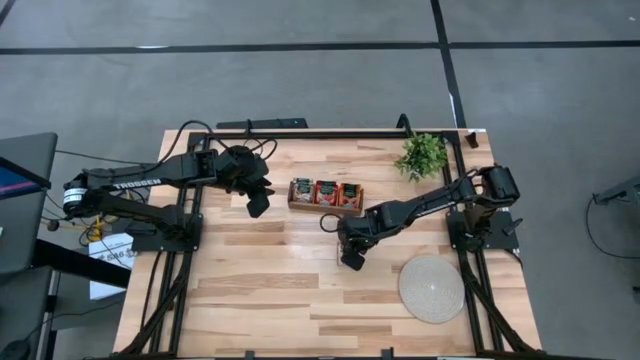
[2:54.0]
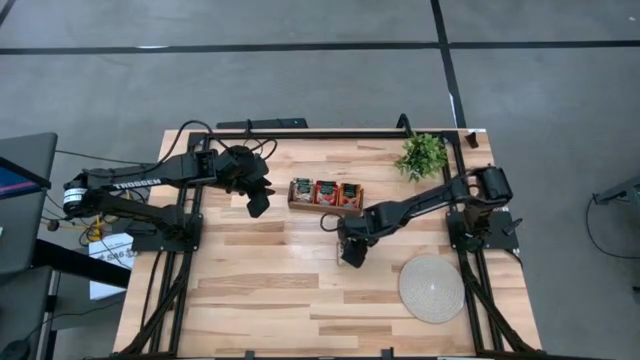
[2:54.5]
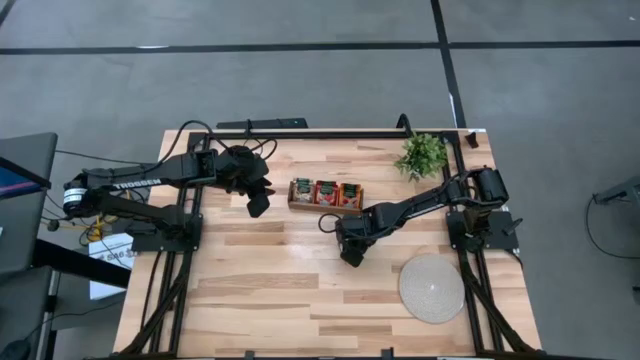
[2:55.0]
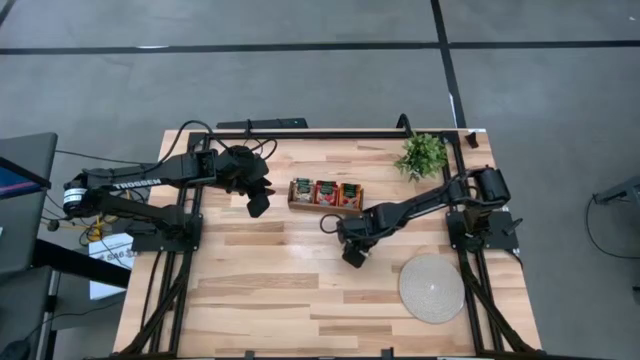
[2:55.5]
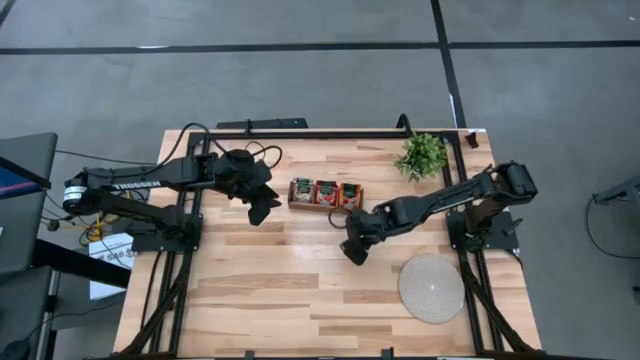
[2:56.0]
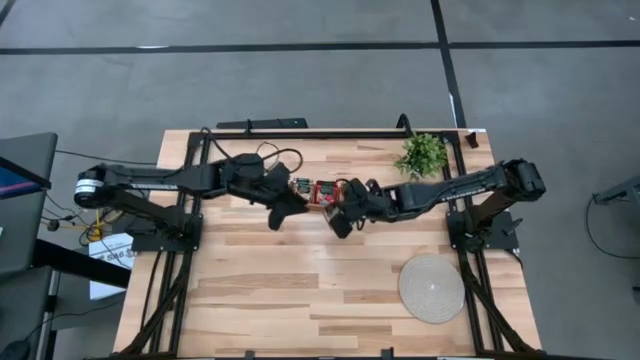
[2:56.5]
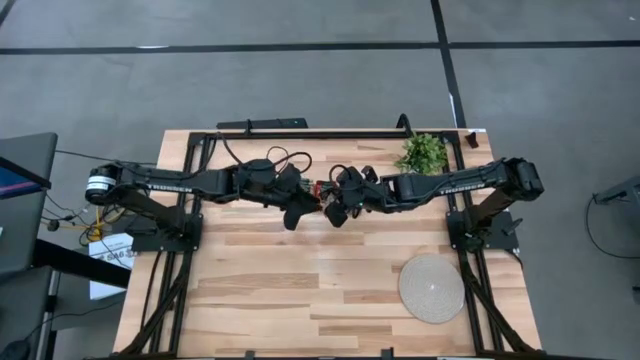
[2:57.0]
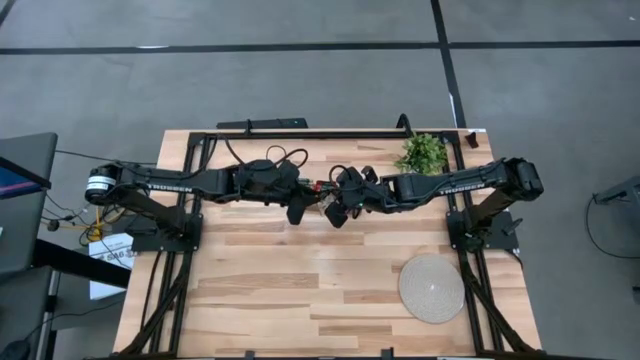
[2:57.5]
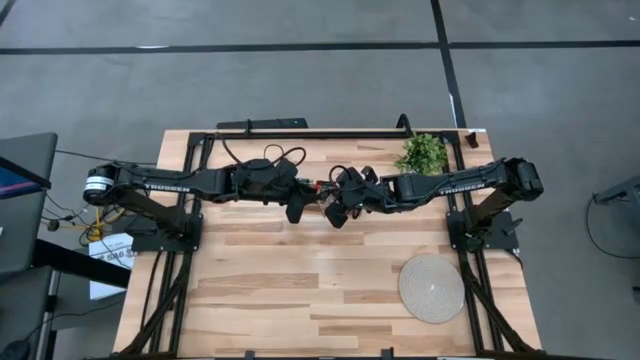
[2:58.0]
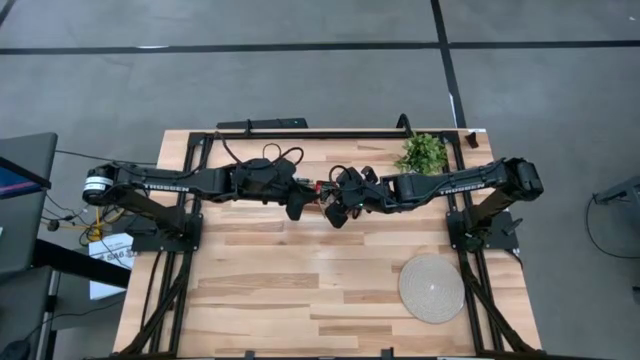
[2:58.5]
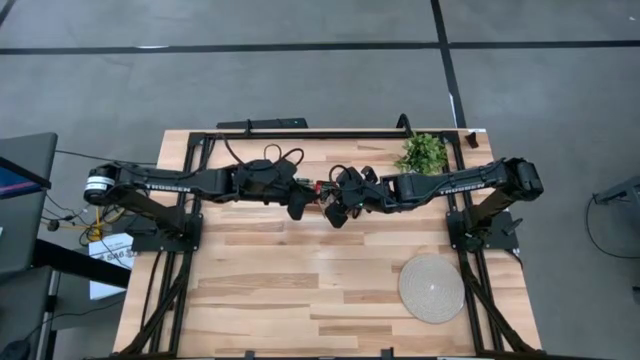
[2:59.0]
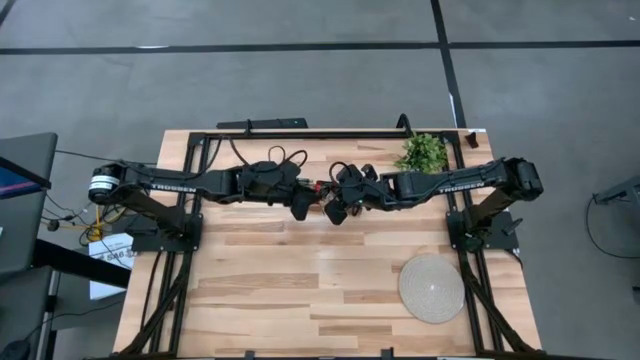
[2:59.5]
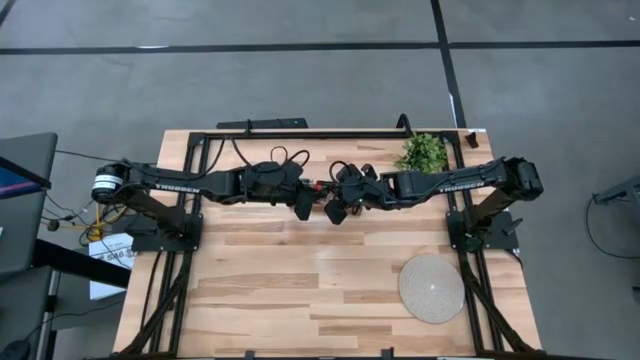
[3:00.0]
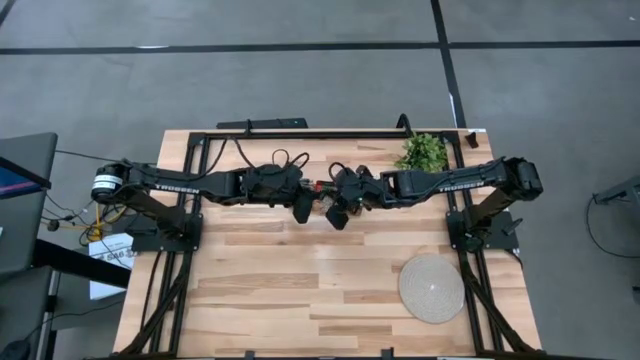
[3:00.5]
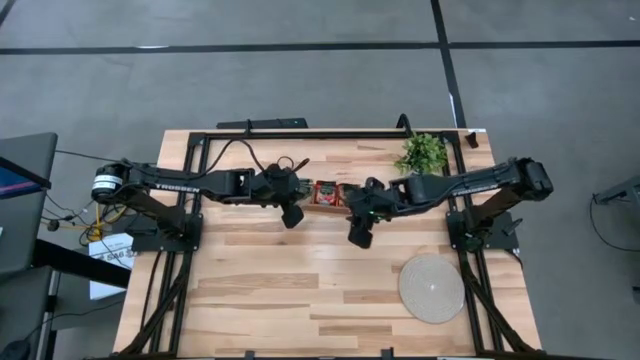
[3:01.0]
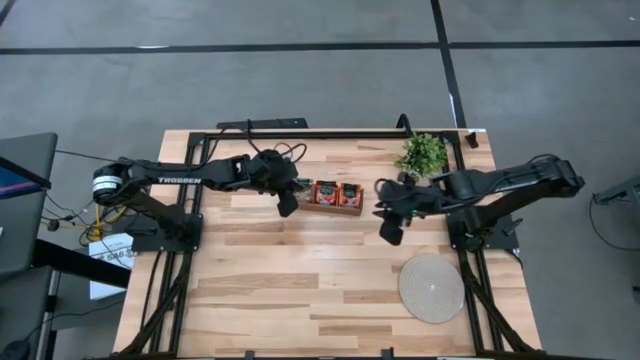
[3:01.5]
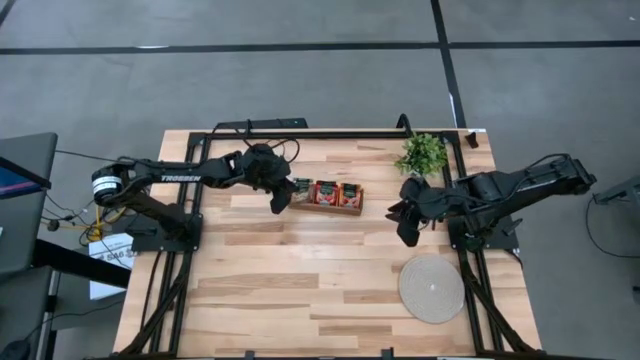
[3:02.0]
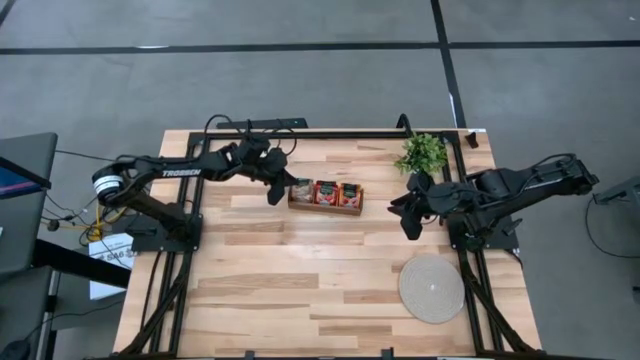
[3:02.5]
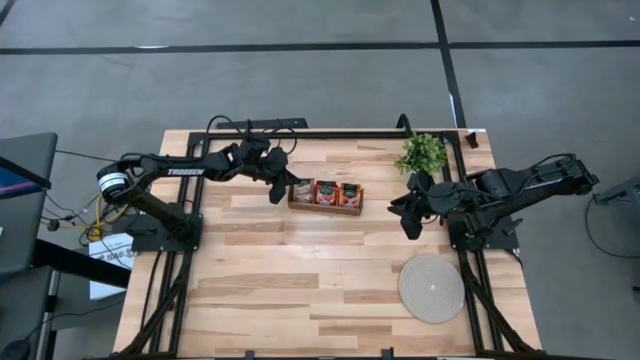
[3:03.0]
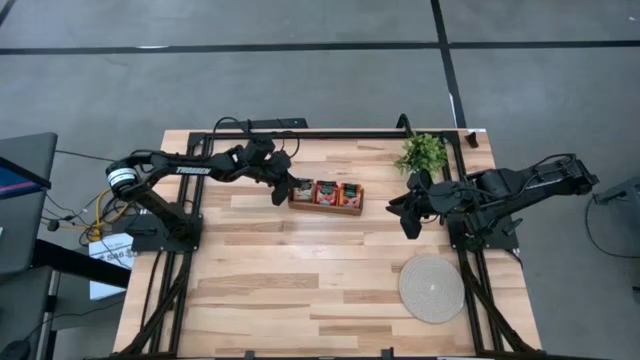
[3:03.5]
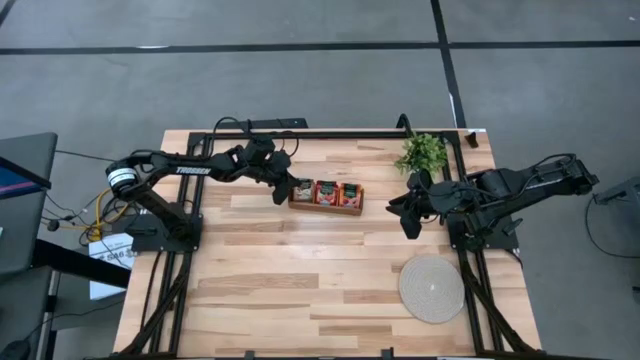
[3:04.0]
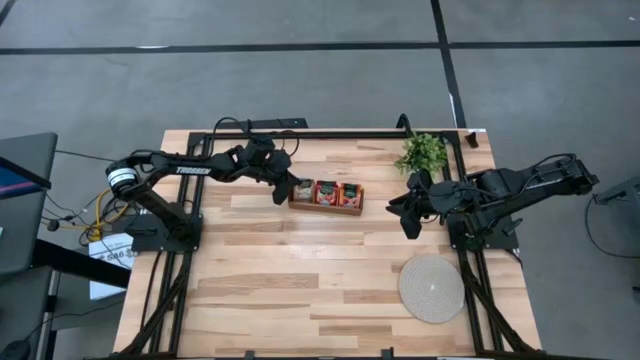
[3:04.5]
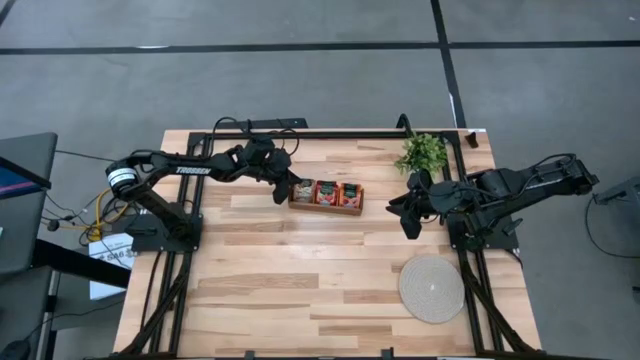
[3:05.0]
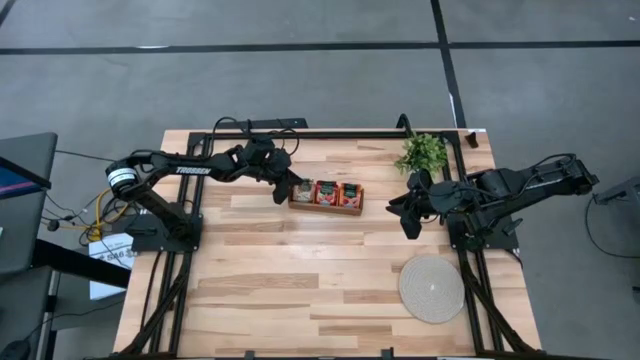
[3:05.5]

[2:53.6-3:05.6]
Task: Pick & Place Tea
Put the brown tea bag into the left section of the wooden organizer

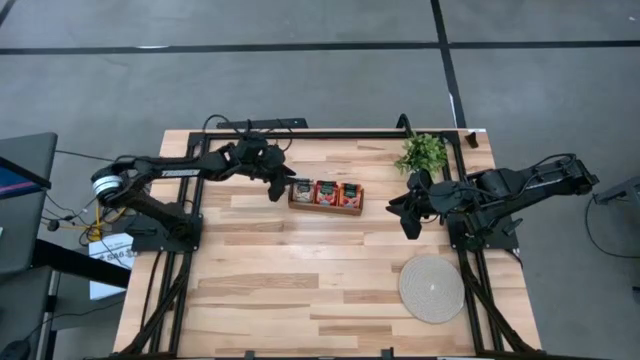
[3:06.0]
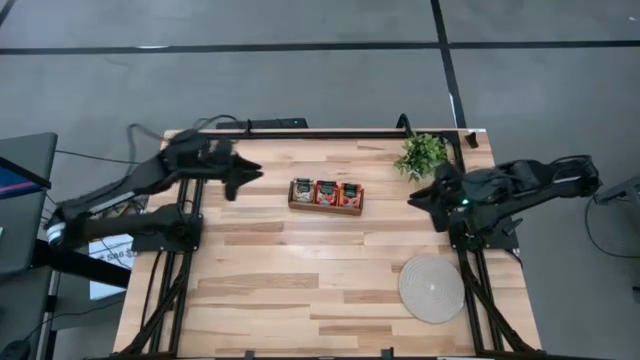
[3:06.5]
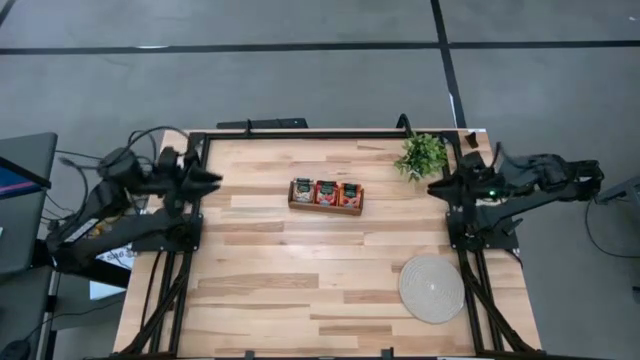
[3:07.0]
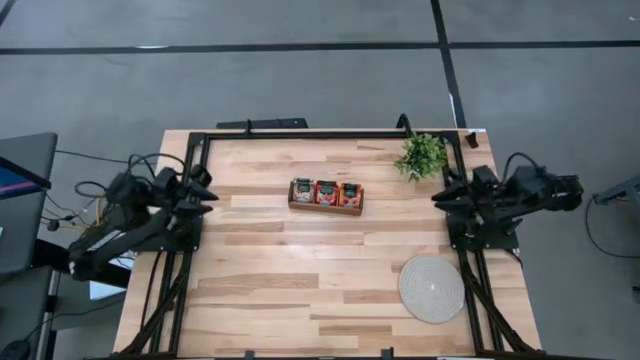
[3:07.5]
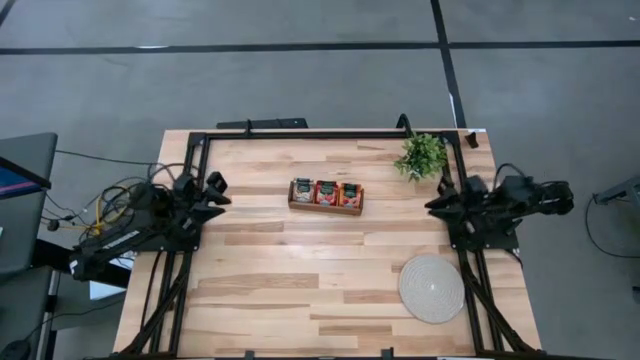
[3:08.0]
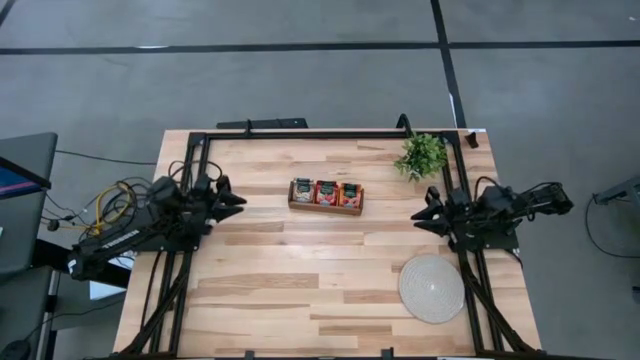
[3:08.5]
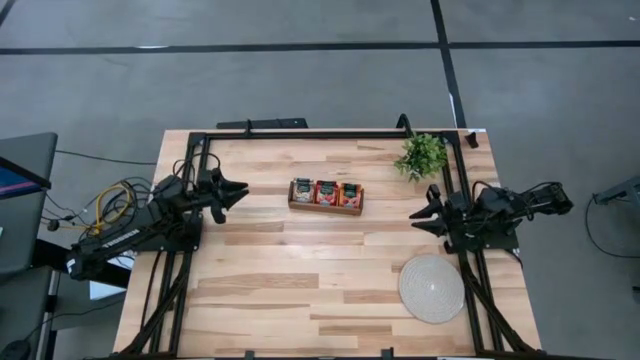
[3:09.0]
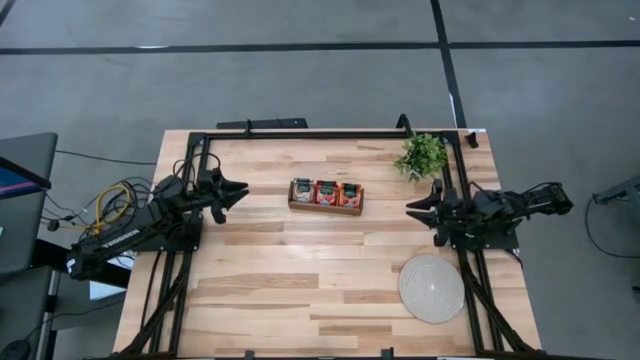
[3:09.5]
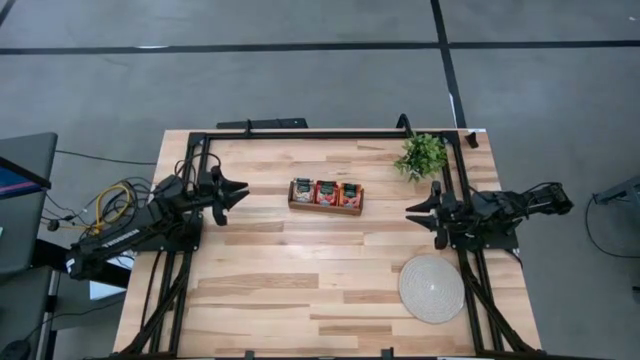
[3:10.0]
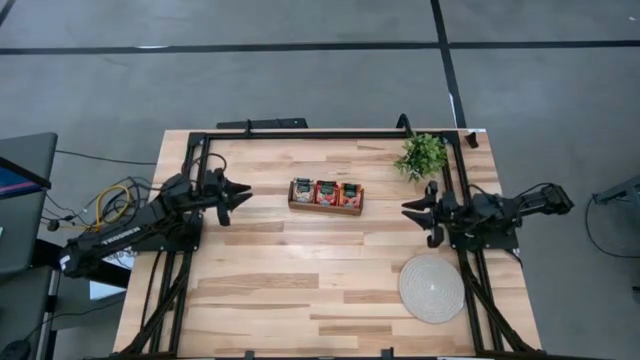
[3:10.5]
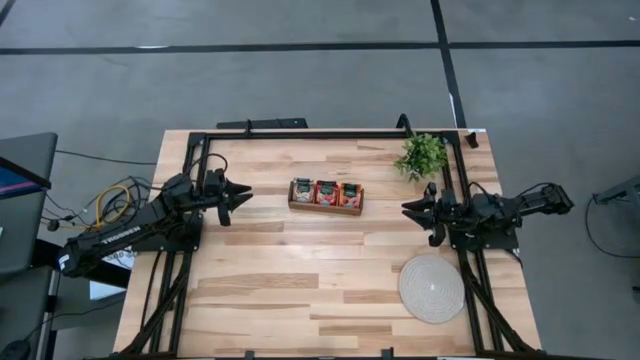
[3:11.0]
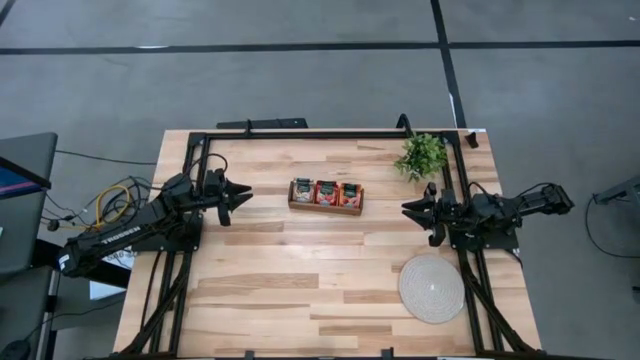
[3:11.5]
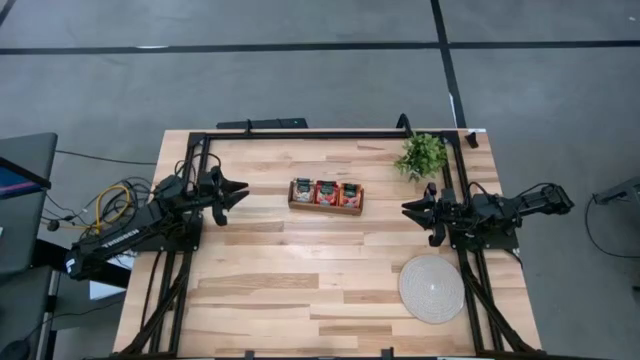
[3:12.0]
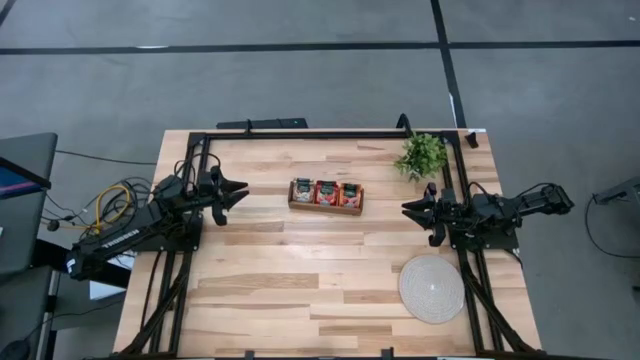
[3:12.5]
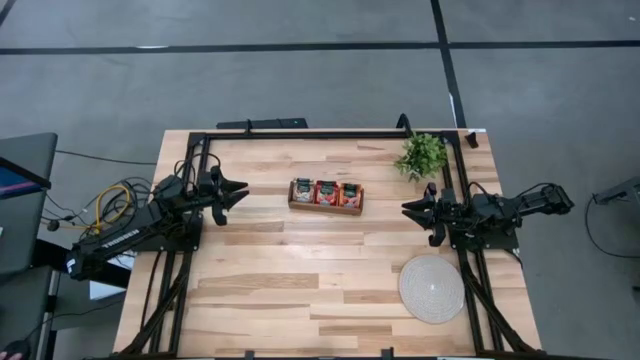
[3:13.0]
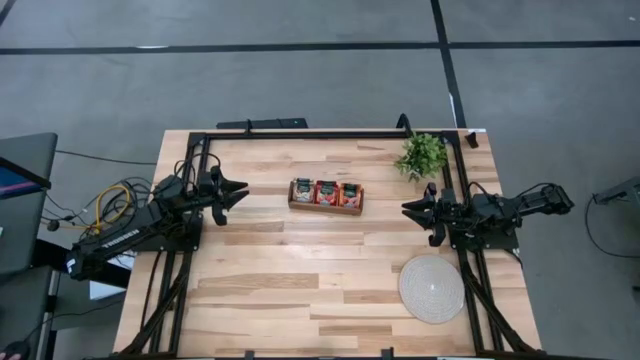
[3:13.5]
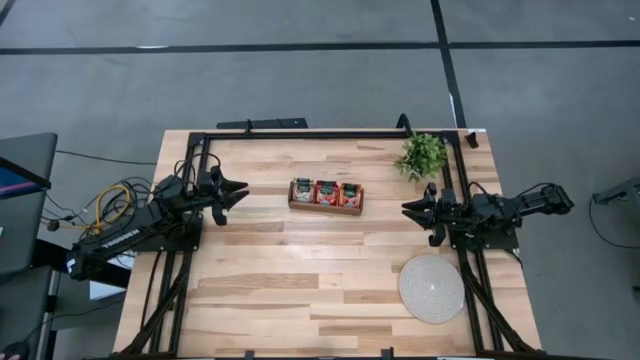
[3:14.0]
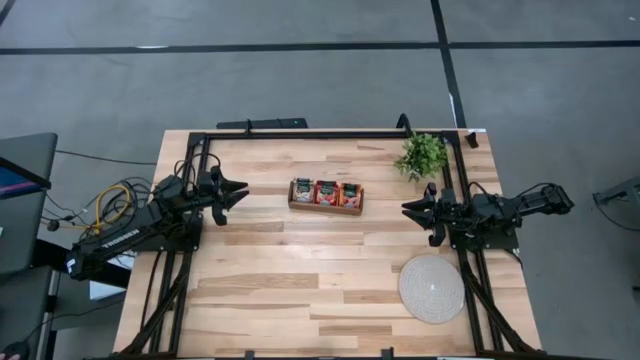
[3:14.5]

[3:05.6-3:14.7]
Return to Home Position
